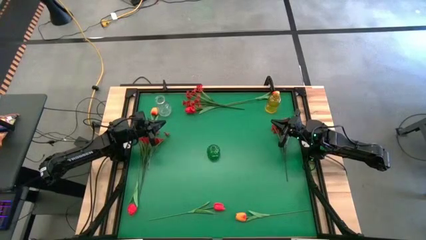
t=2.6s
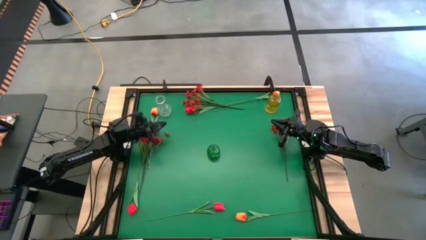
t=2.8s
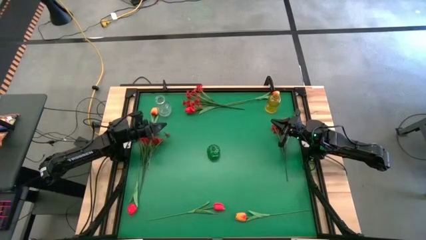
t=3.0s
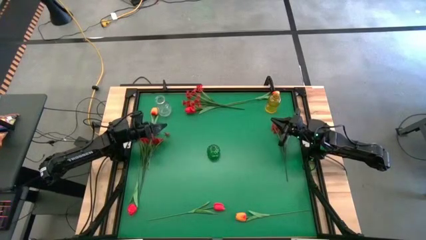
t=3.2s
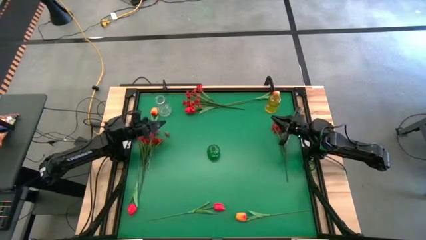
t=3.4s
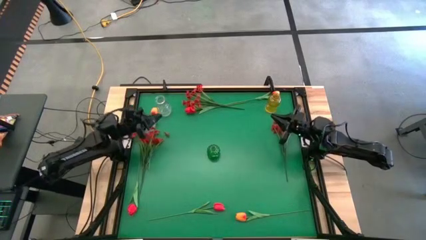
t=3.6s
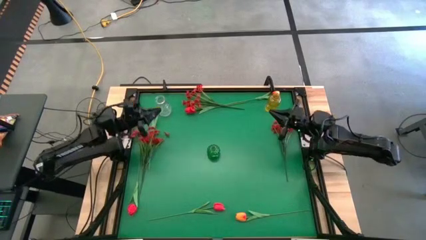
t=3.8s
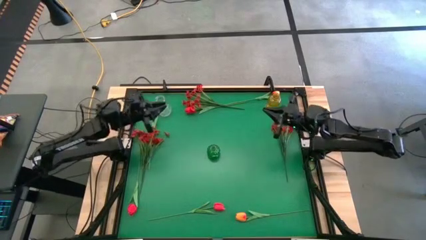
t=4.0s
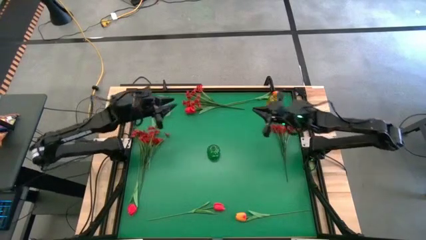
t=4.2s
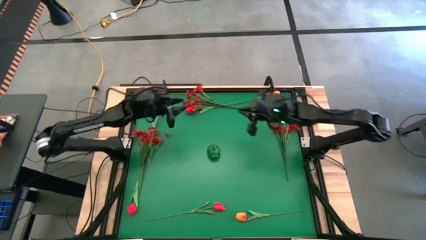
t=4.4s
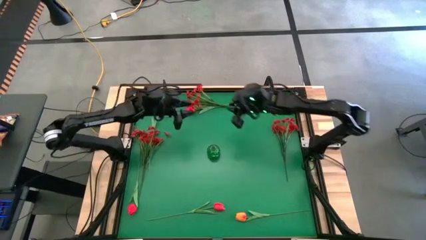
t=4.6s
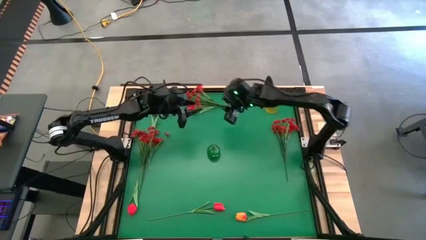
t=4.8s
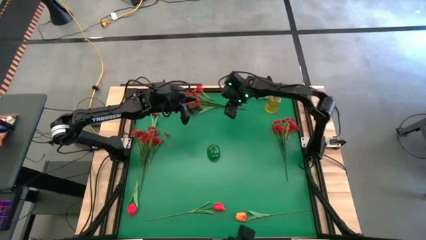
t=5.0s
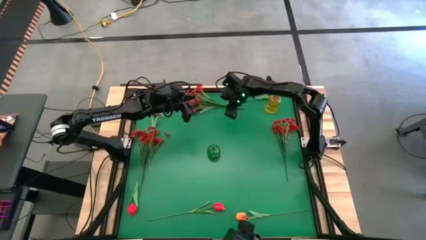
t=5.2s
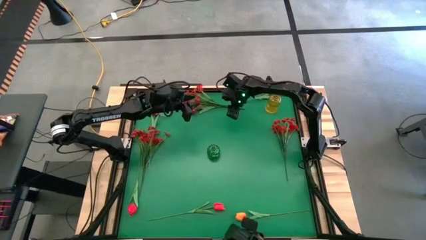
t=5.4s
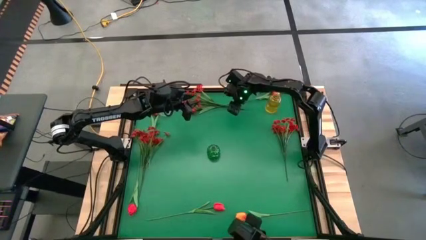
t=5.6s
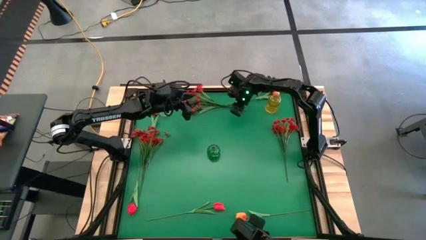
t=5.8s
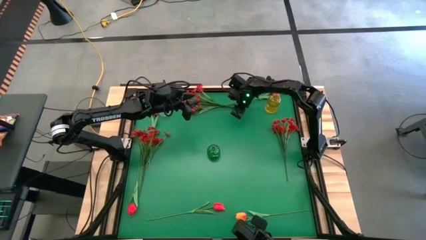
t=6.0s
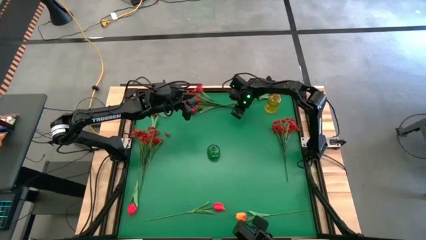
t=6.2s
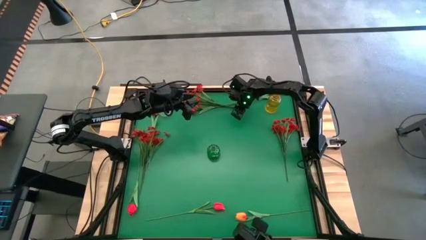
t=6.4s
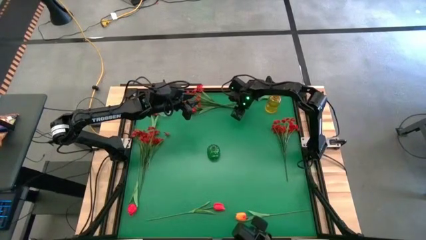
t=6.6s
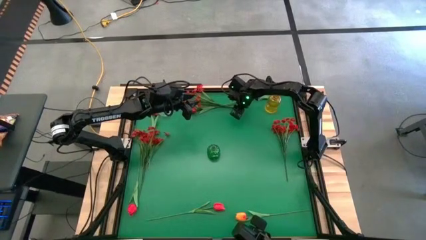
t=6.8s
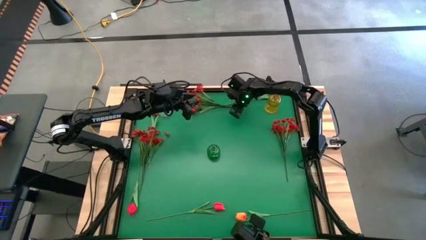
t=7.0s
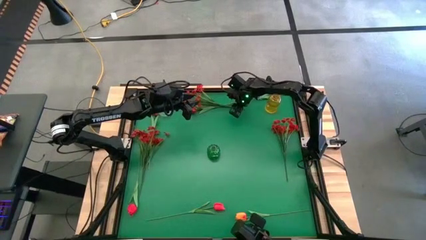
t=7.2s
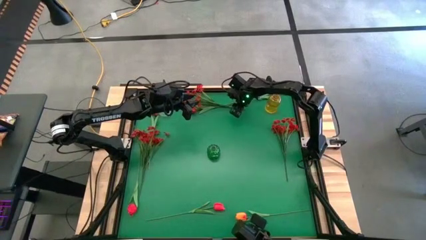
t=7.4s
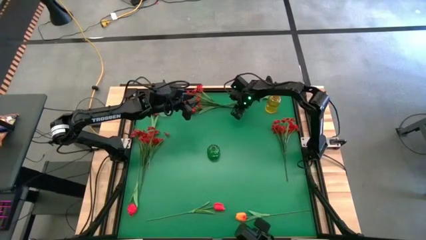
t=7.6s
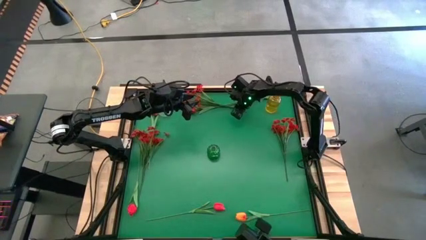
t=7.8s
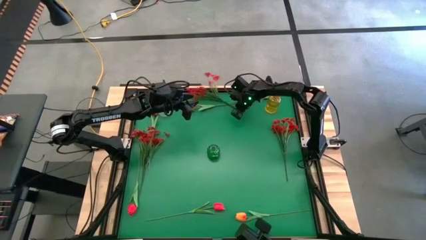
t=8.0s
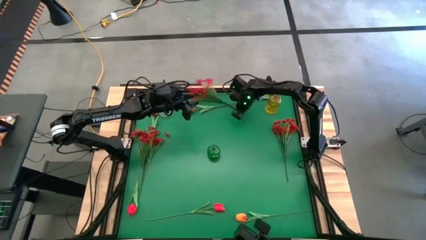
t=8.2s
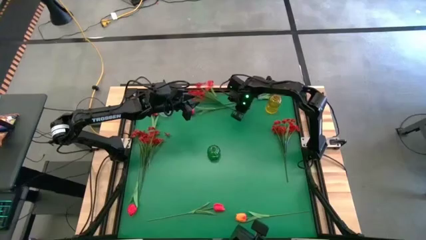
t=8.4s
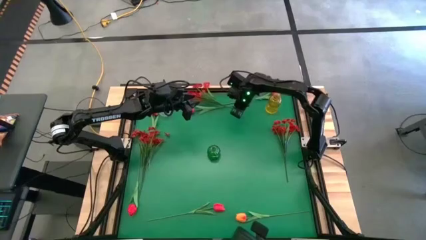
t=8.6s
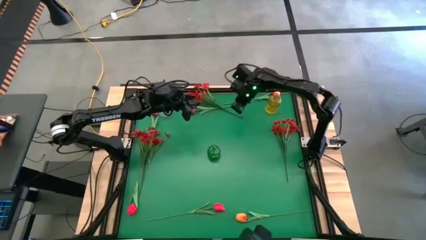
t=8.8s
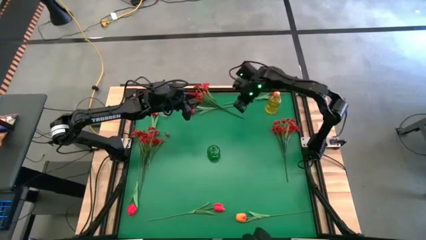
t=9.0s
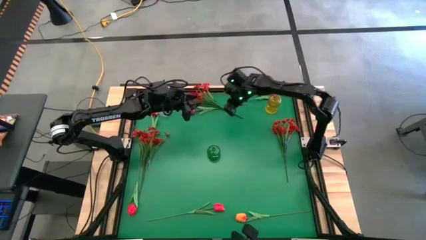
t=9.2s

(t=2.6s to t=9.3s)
Task: Sort flowers into vase by color
Put the top red flowers into the yellow vase

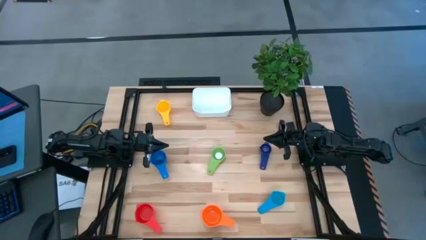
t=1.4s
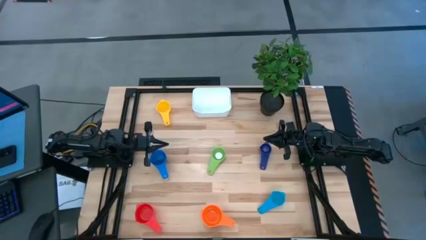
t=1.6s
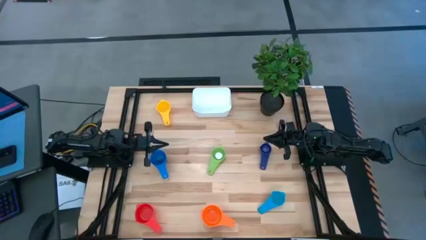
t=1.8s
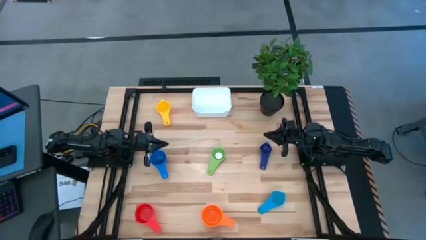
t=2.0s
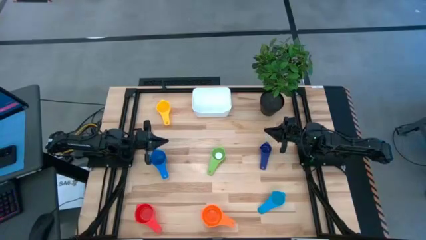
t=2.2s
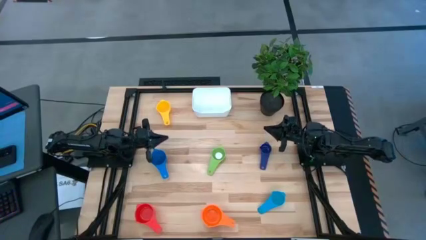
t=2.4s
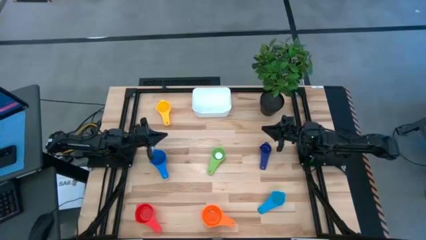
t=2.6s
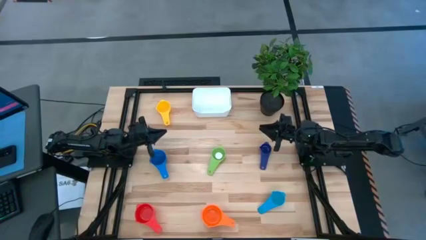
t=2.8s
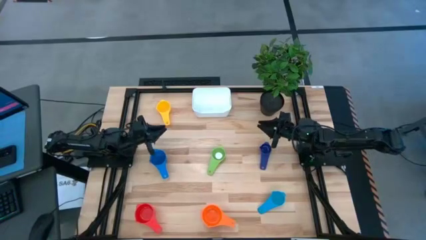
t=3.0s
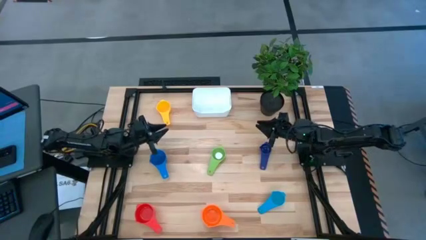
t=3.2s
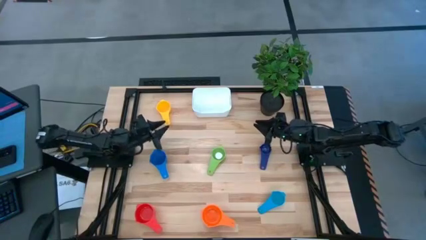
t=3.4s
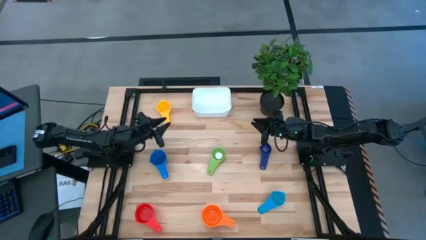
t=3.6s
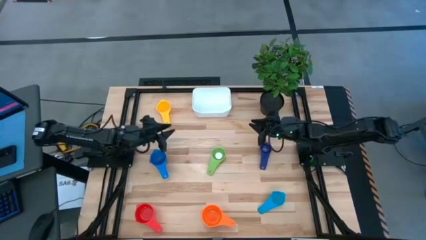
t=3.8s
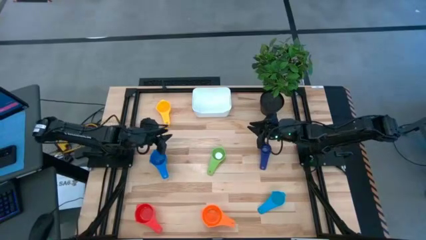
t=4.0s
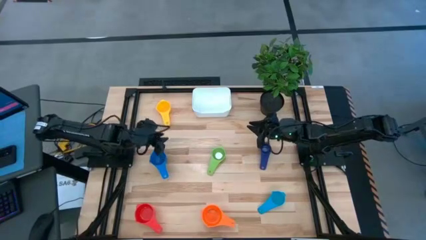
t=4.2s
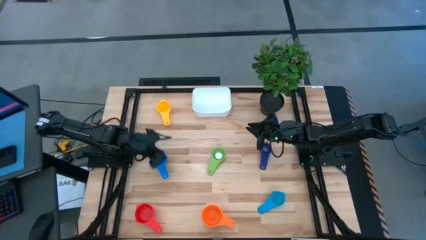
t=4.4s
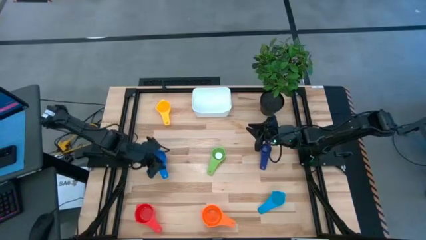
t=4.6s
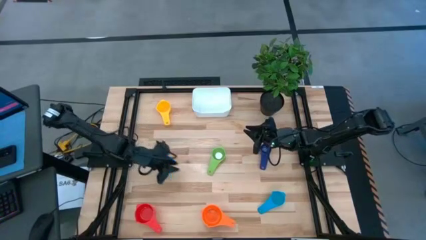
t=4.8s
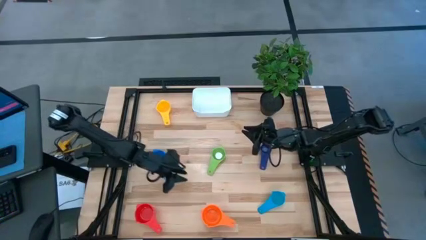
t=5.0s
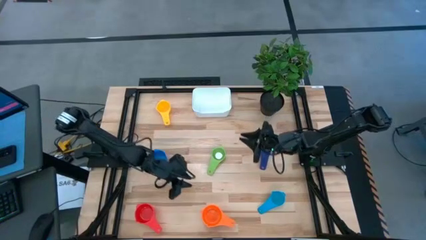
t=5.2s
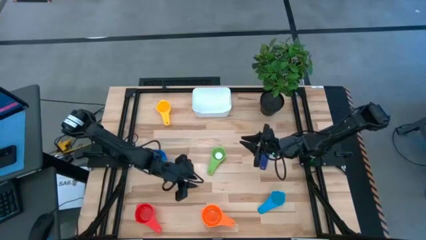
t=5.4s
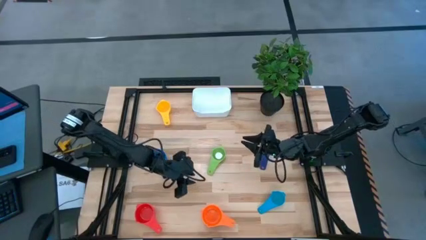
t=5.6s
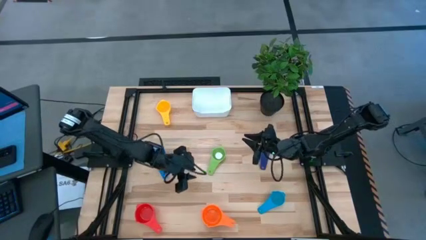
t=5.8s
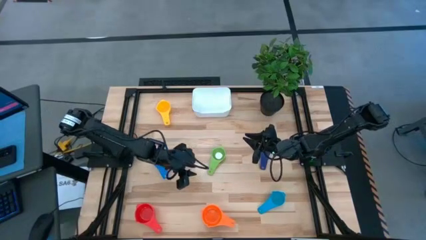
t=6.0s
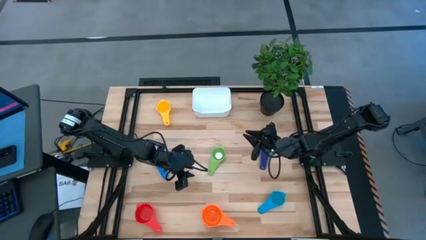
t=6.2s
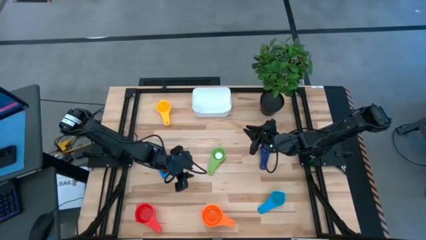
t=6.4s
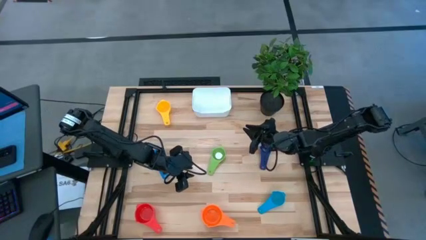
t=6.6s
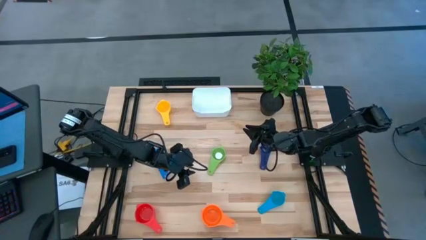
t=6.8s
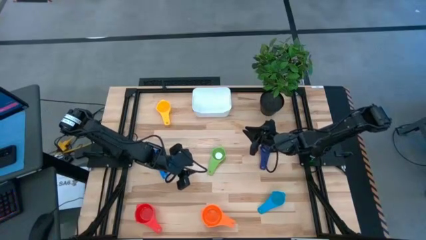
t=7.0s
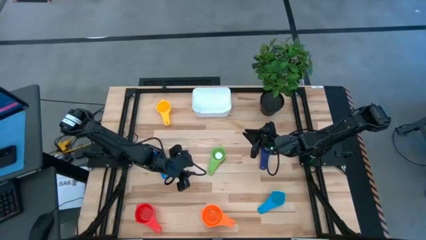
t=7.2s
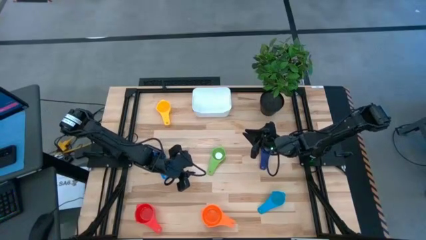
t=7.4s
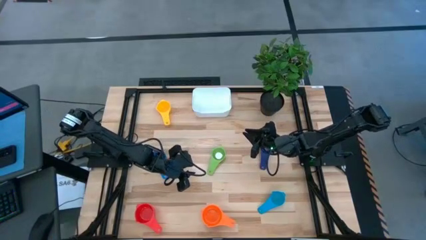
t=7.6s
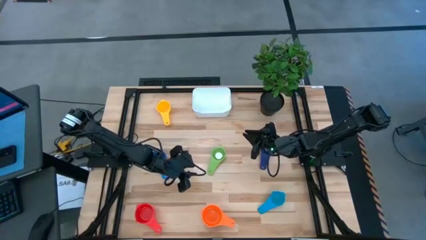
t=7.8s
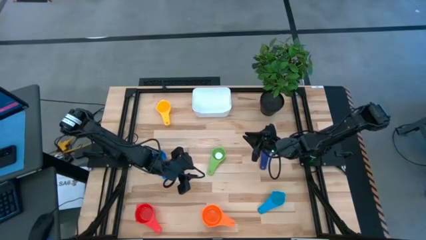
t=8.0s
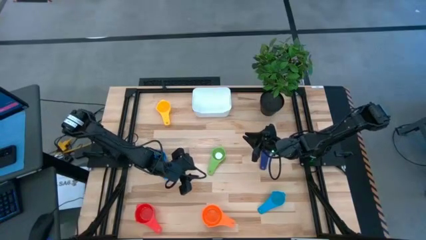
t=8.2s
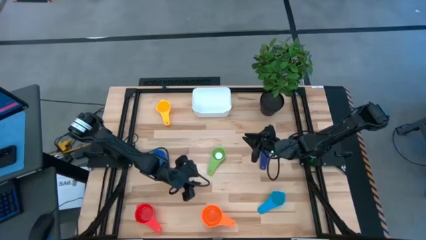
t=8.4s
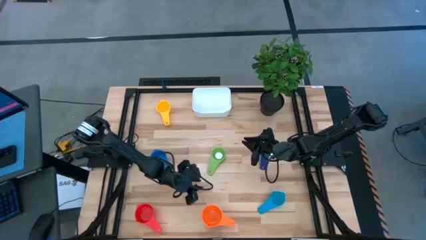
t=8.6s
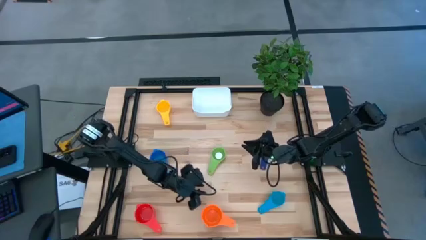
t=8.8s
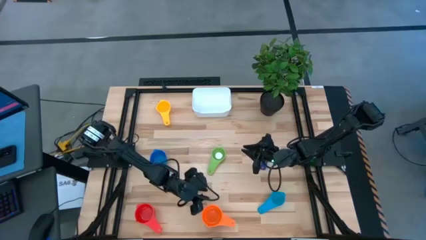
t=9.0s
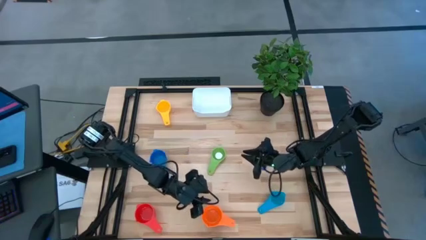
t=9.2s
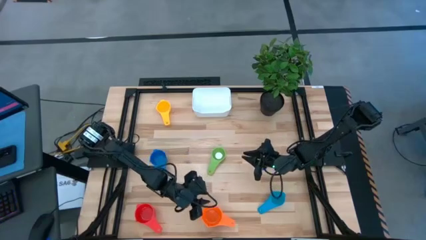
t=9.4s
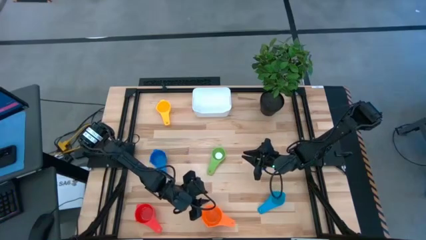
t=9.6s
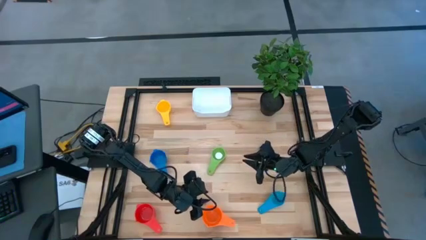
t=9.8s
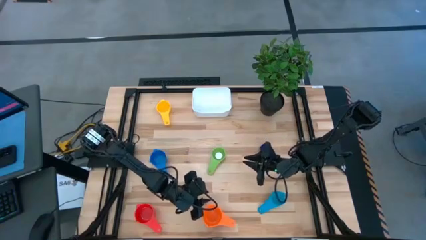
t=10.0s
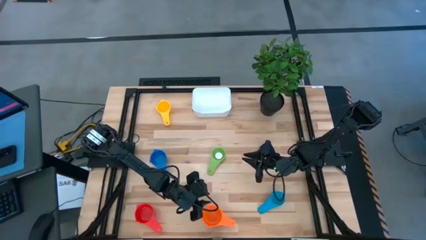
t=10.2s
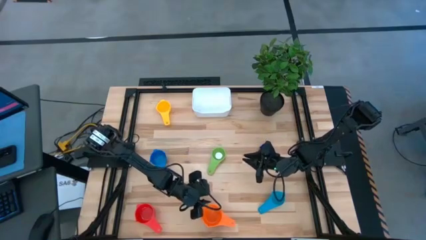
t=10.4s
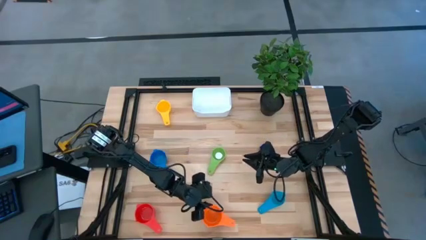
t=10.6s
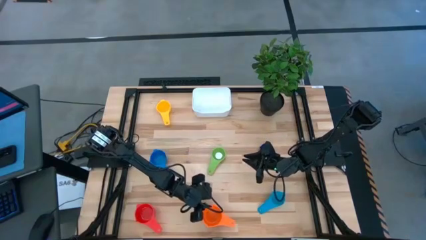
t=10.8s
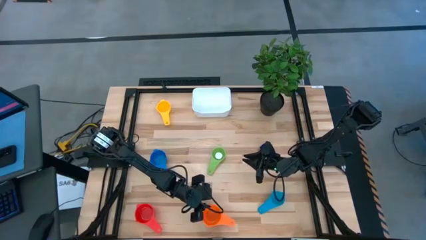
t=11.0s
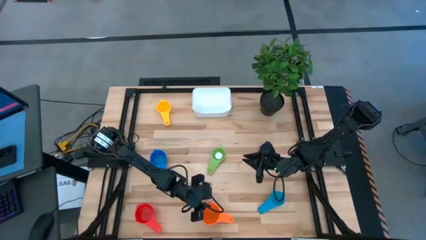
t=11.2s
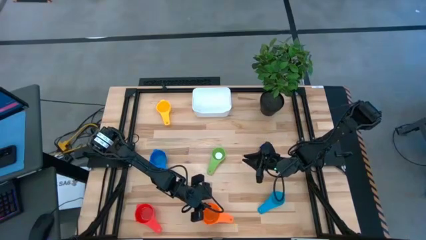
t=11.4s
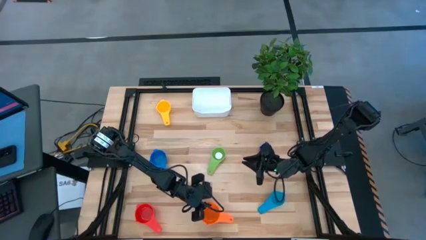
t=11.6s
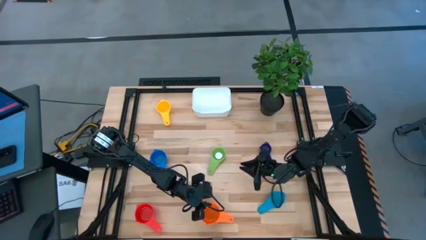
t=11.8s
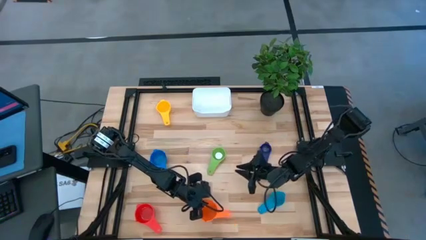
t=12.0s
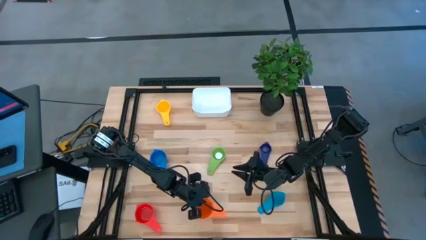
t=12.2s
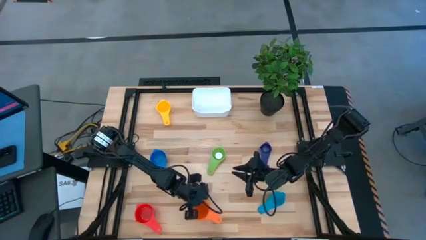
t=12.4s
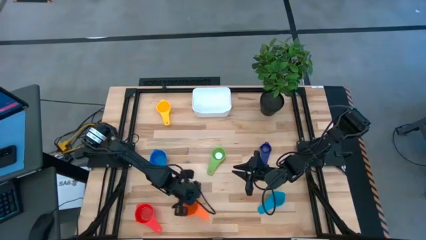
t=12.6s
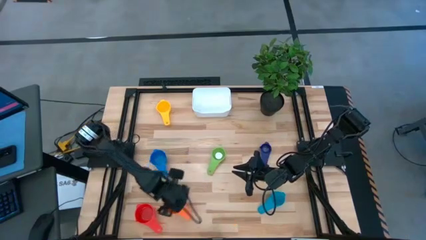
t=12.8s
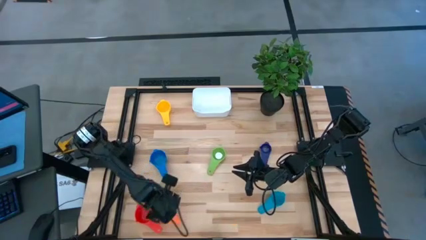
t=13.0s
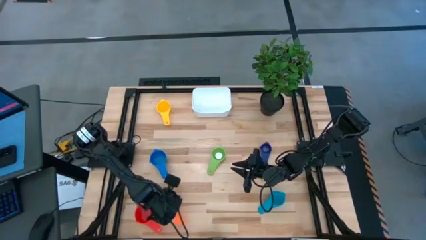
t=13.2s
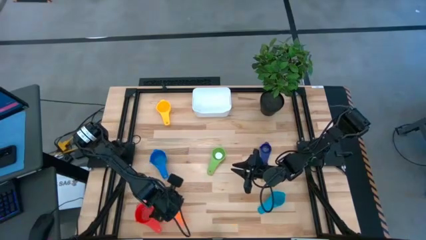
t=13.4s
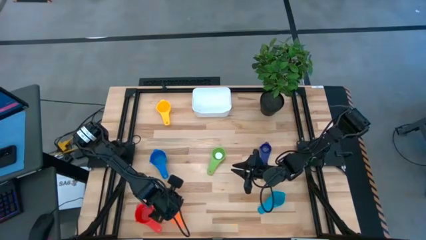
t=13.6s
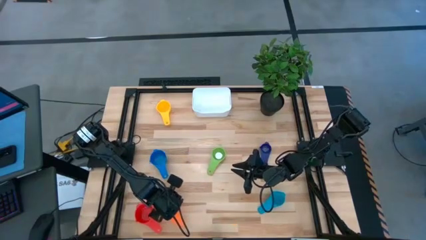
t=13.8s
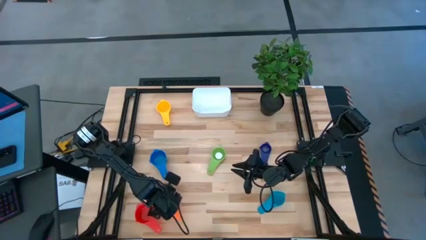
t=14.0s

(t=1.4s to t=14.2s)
Task: Nest measuring cups in basket
Move the orange measuring cup to the bottom right of the table
